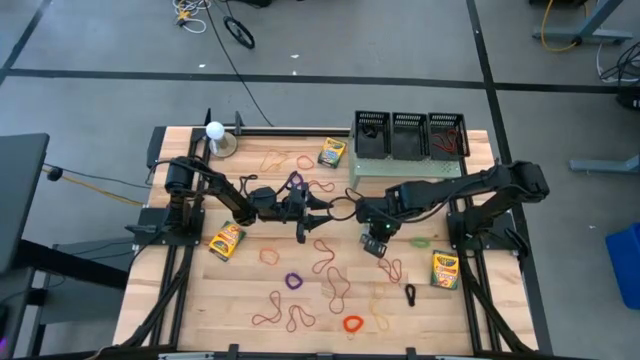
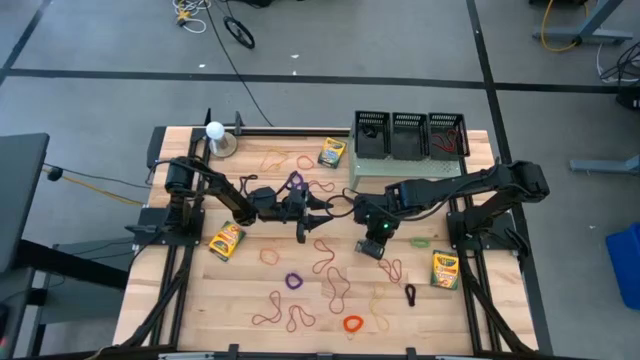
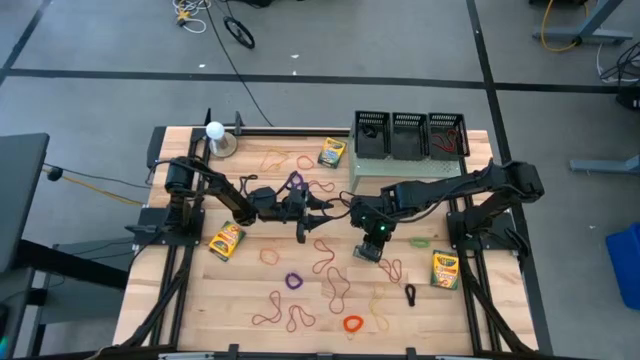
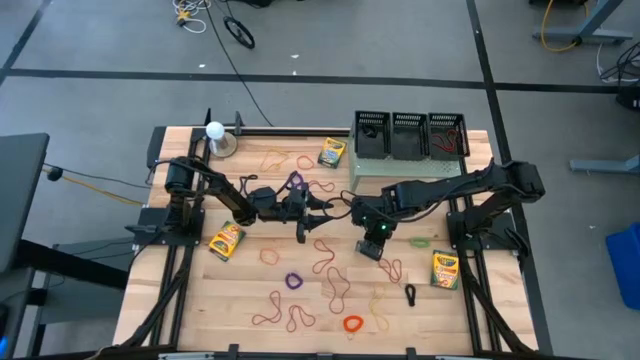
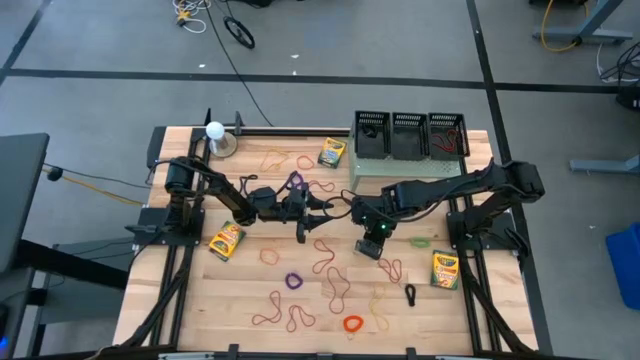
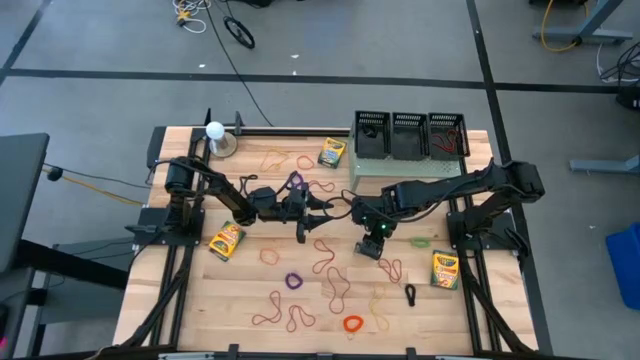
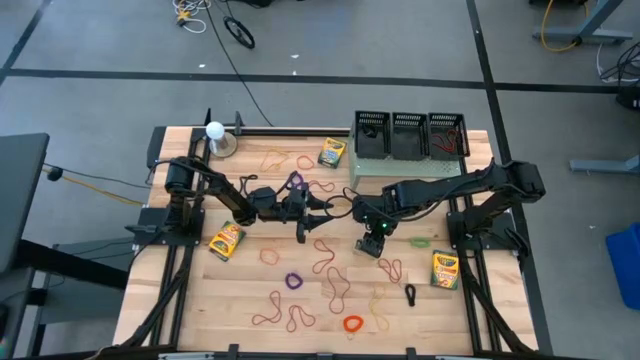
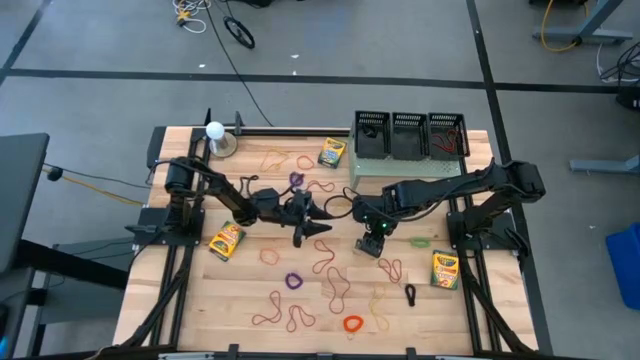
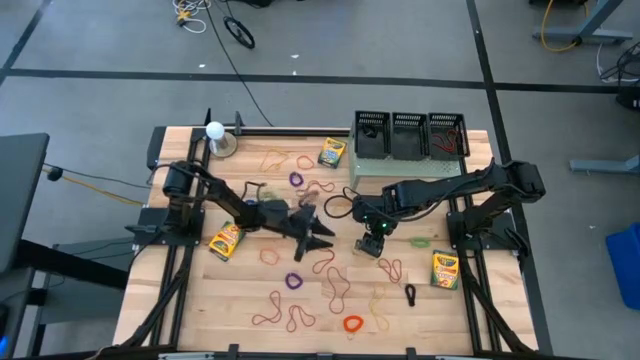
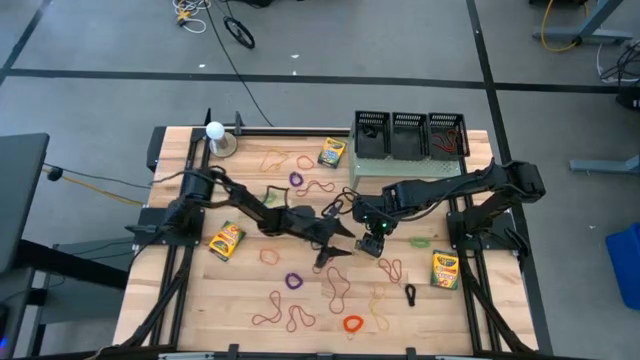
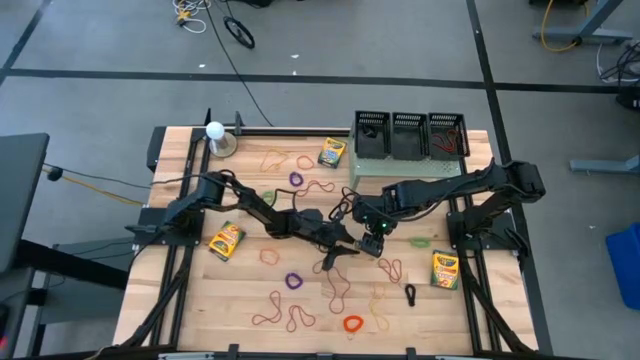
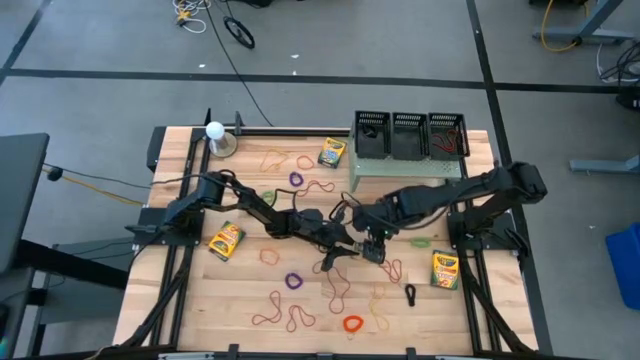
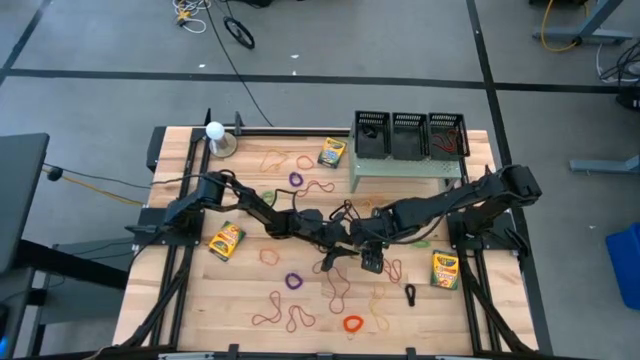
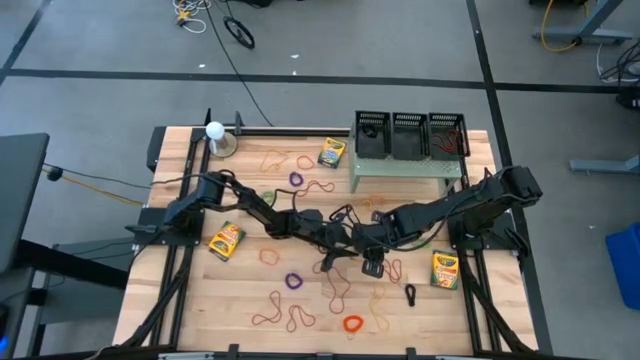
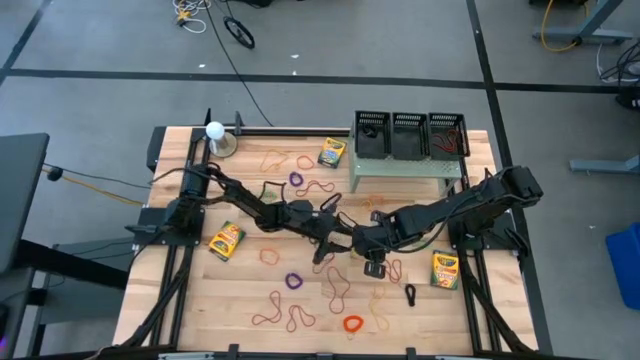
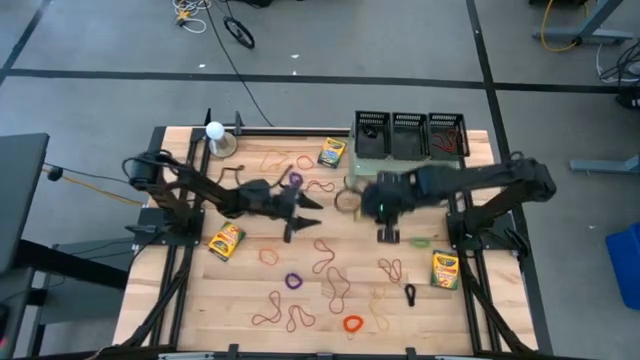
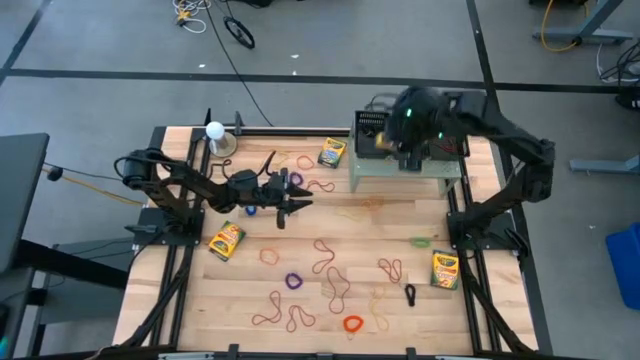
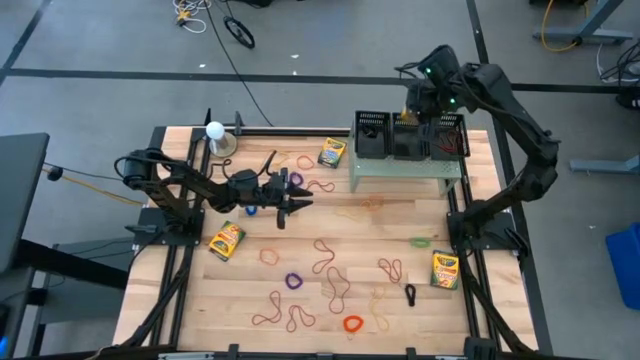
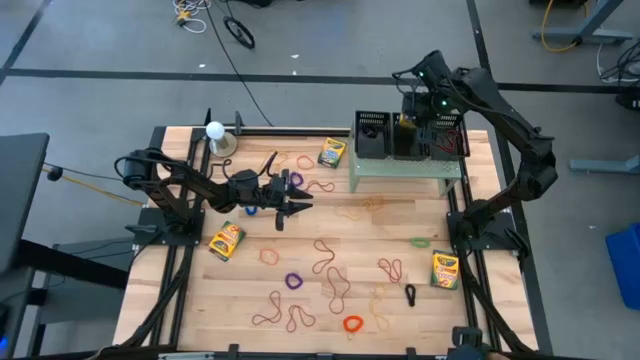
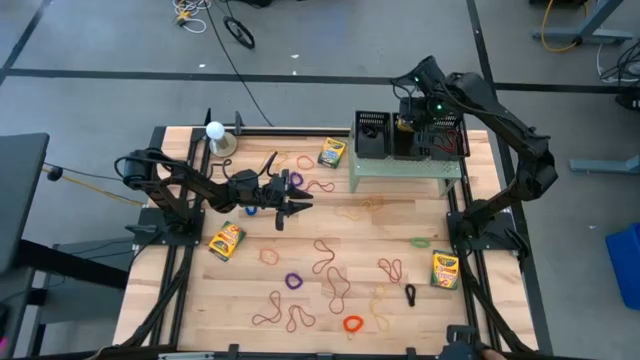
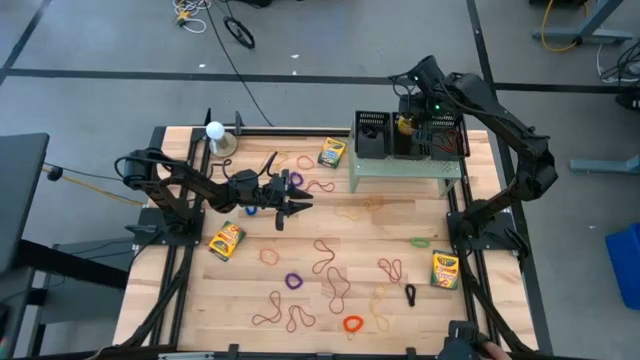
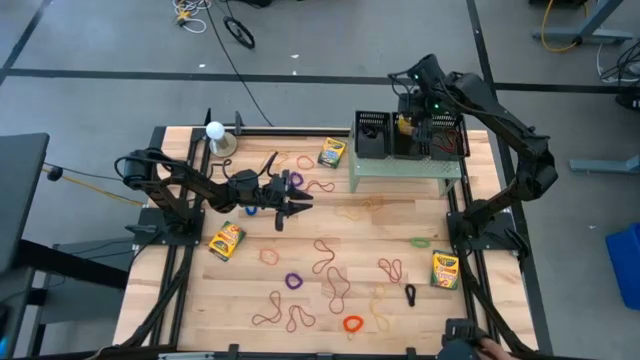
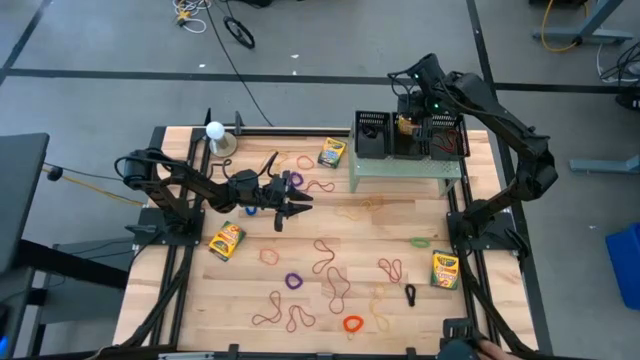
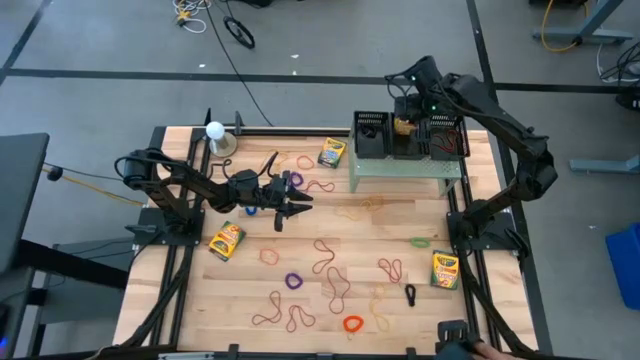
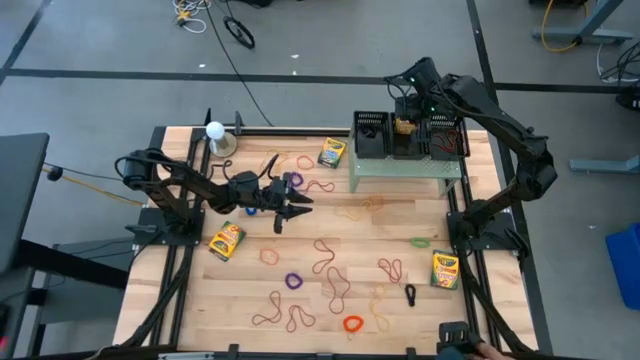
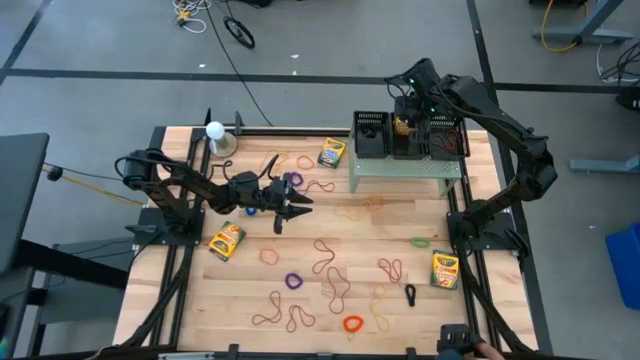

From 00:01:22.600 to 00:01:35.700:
Task: Pick & Place Office Desk Supplies
Put the yellow crayon box into the middle black basket on the shelf

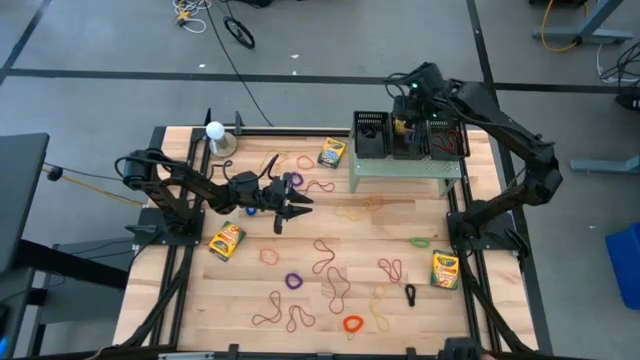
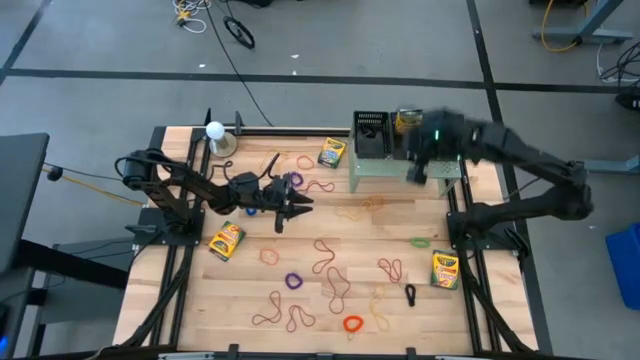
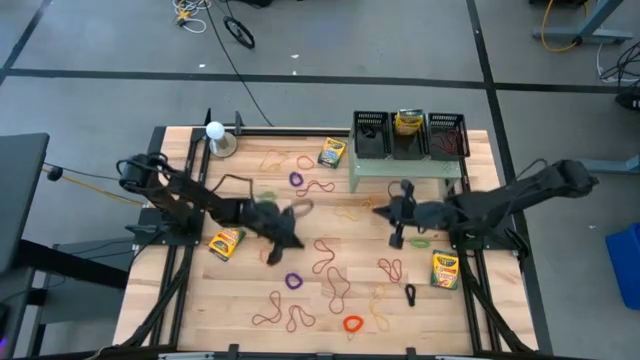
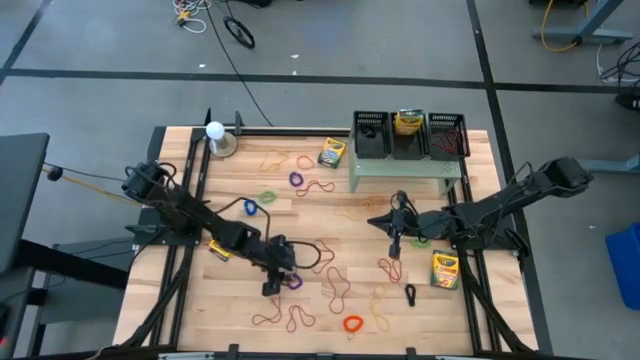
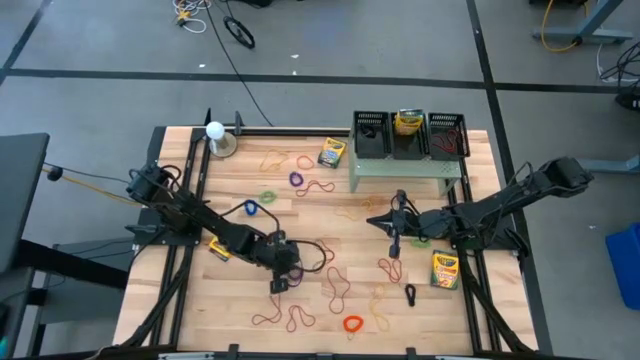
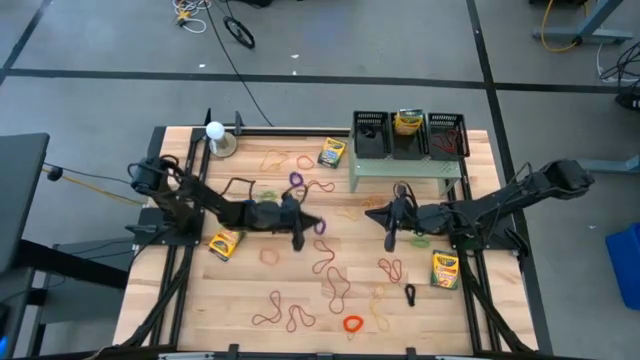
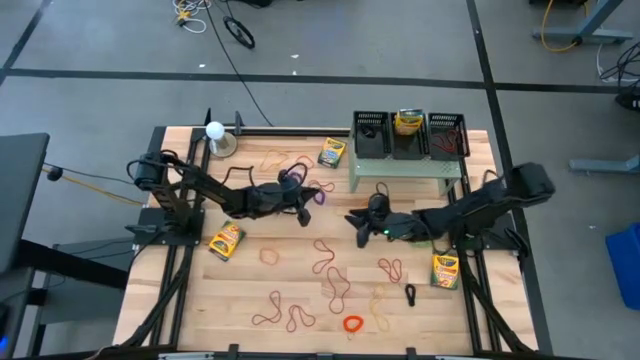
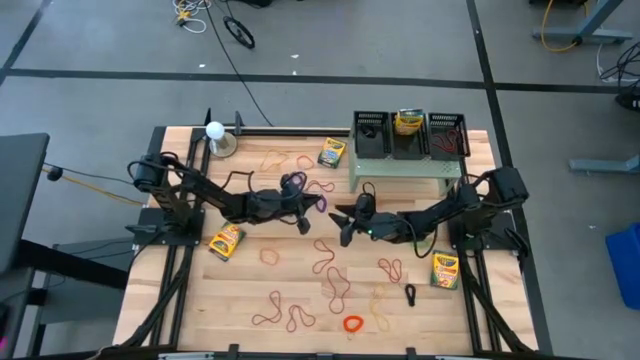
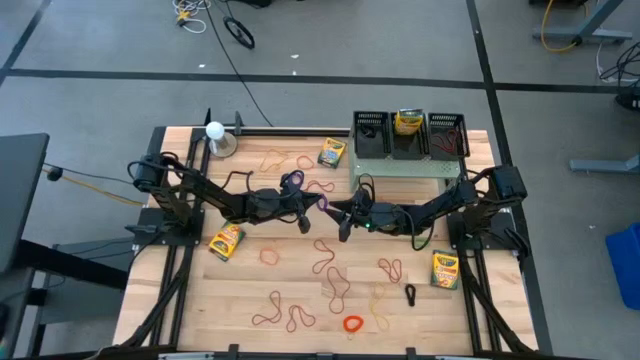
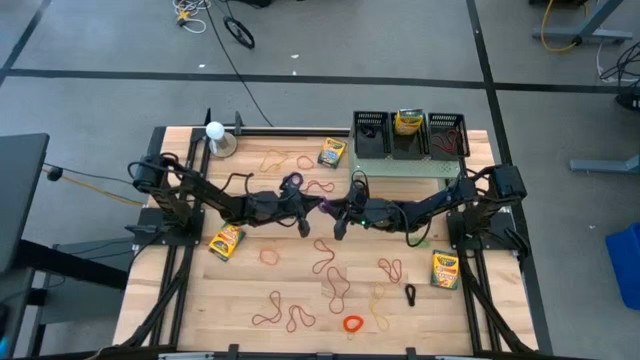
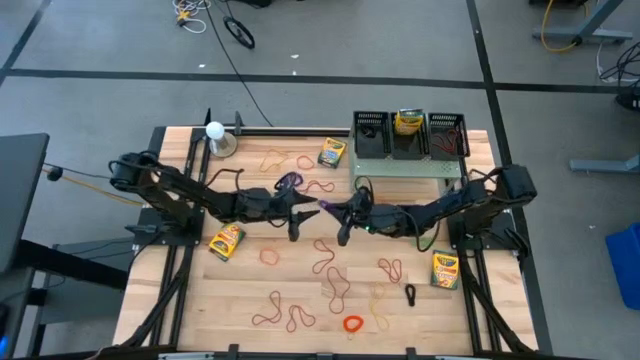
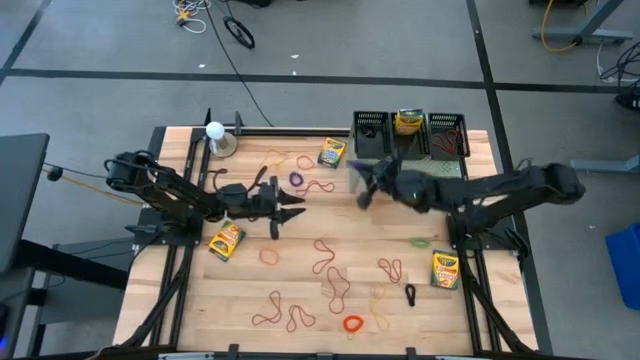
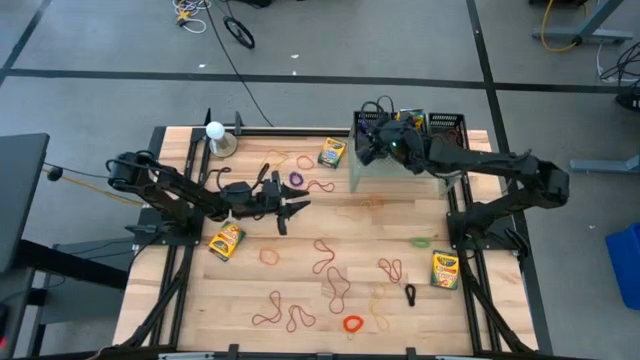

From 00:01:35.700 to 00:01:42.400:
Put the bottom purple spring keychain into the left black basket on the shelf

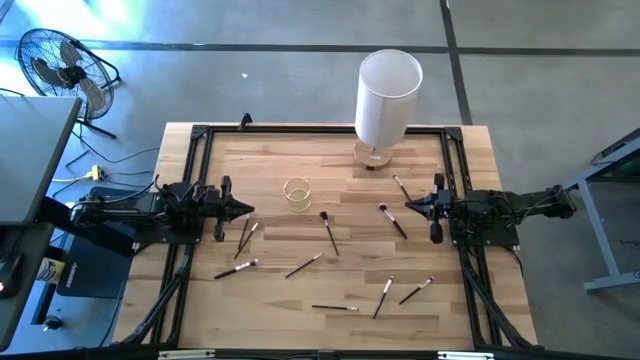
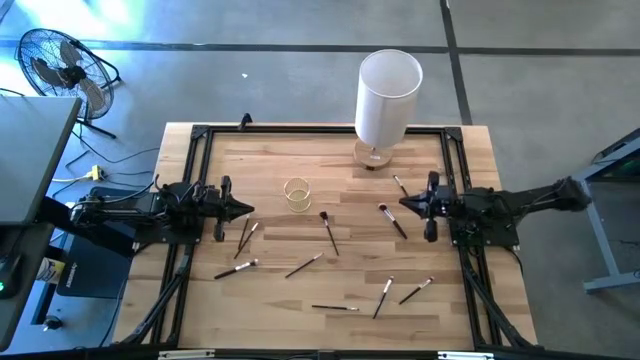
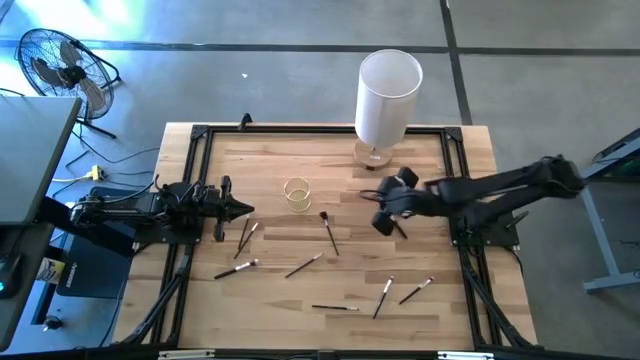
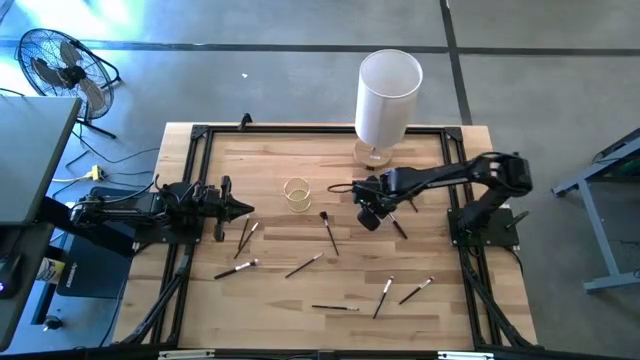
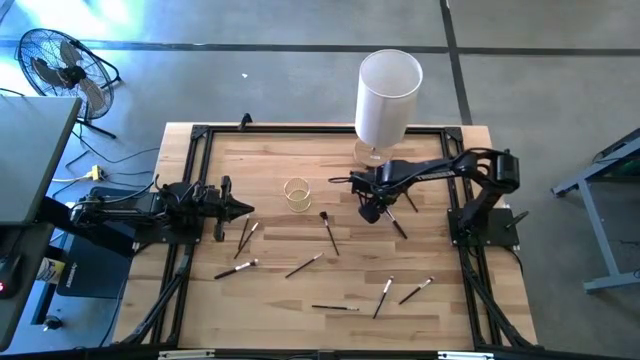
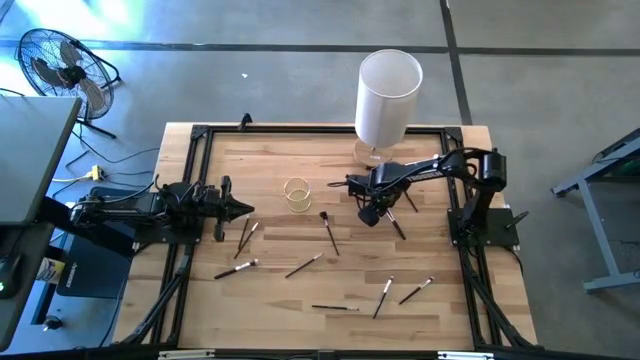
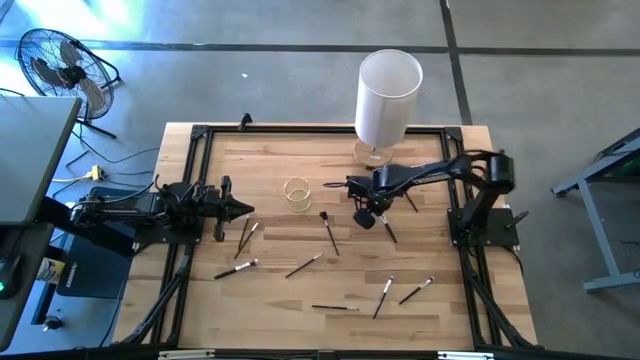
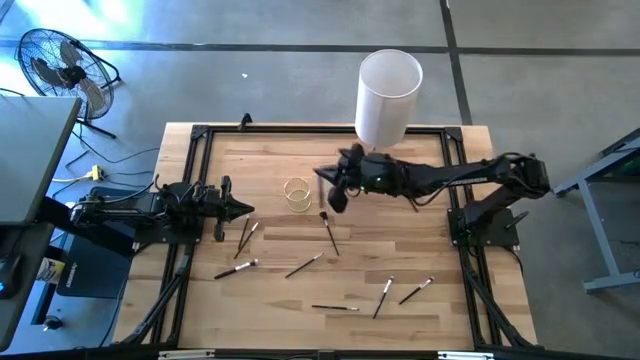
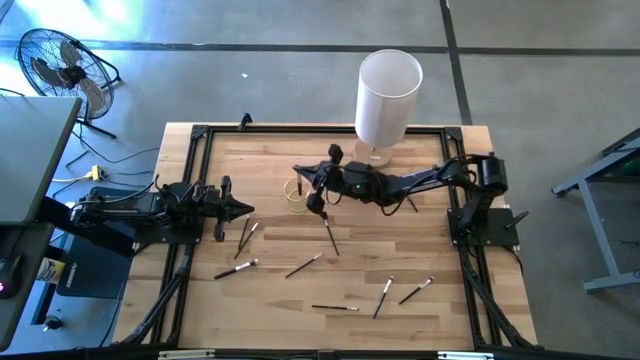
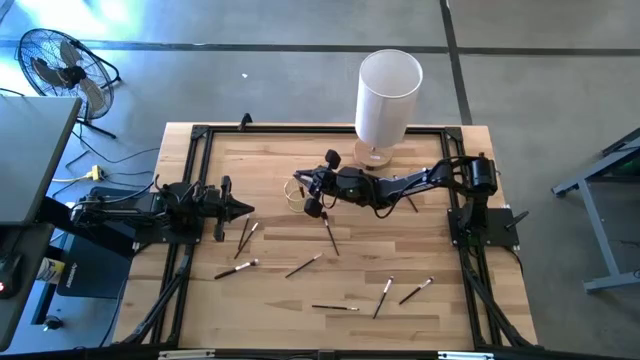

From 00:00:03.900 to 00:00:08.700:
Task: Put items in baskets/containers
Put the black powder brush into the yellow holder
